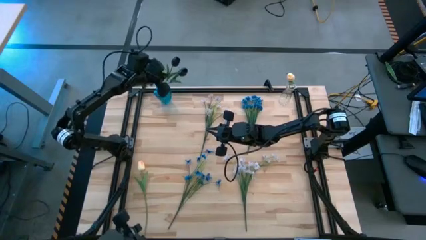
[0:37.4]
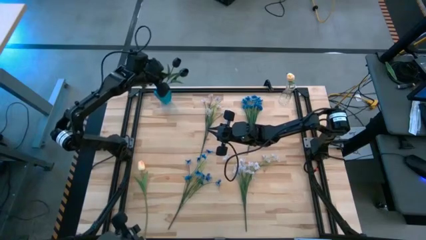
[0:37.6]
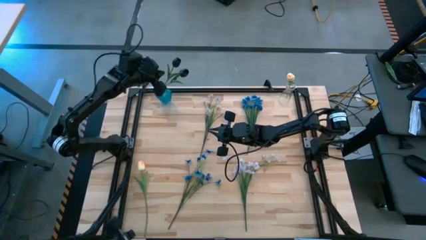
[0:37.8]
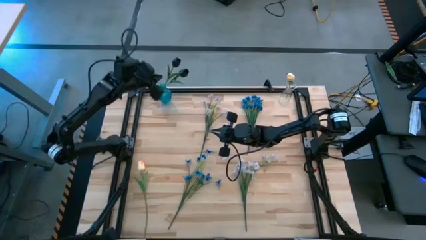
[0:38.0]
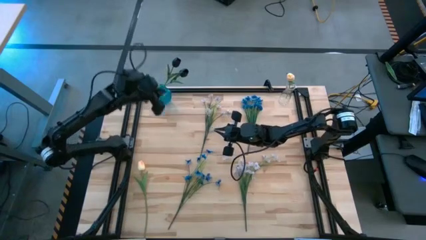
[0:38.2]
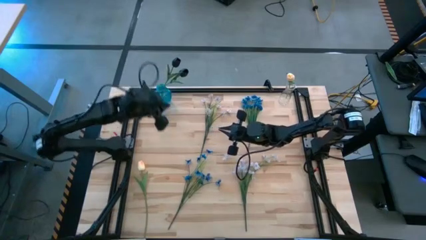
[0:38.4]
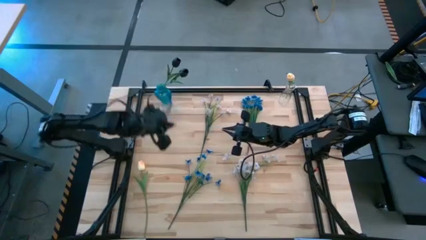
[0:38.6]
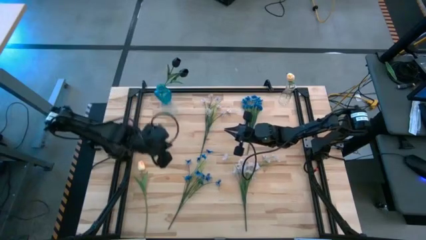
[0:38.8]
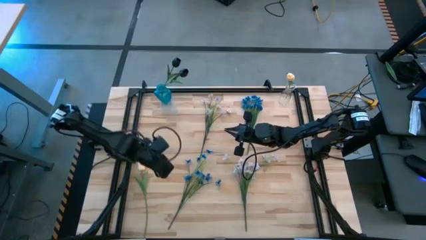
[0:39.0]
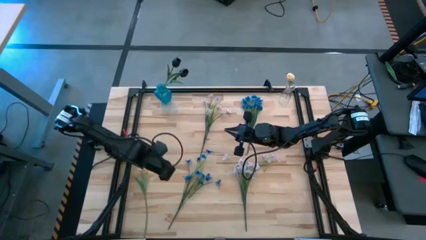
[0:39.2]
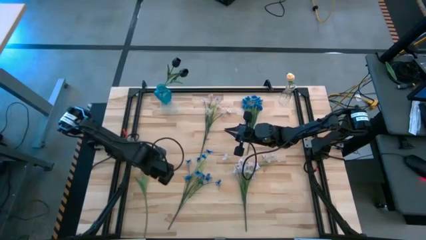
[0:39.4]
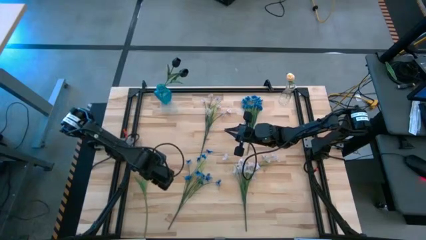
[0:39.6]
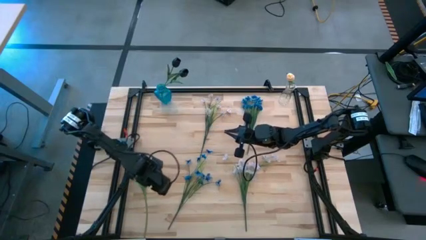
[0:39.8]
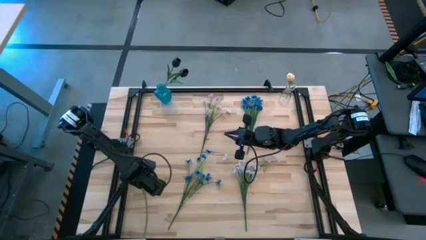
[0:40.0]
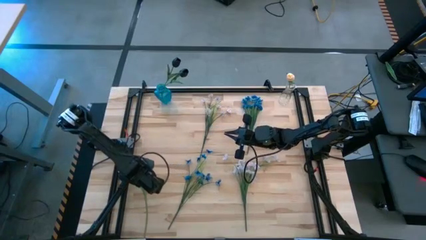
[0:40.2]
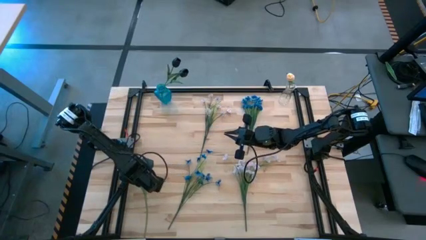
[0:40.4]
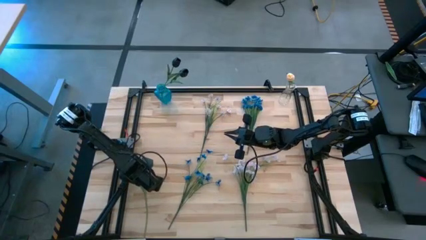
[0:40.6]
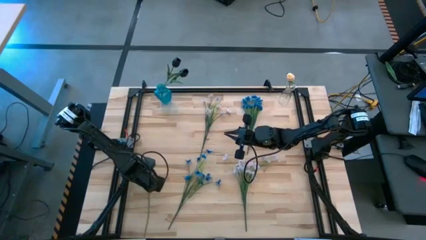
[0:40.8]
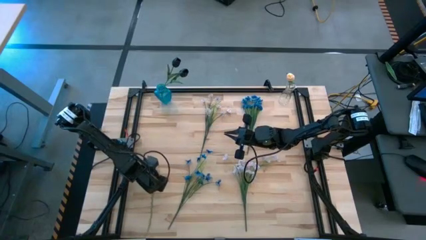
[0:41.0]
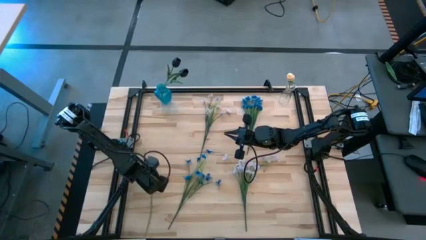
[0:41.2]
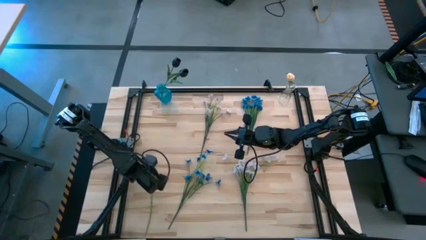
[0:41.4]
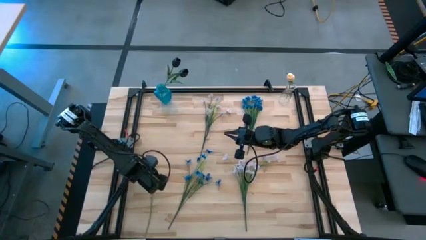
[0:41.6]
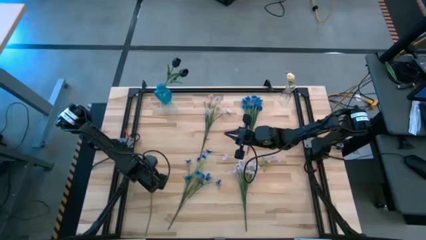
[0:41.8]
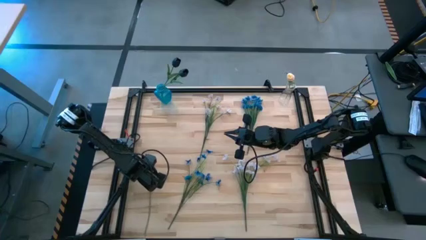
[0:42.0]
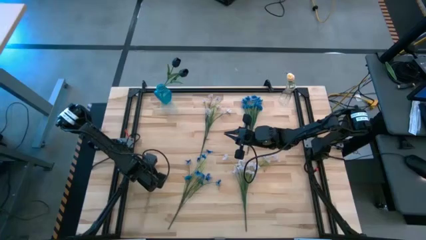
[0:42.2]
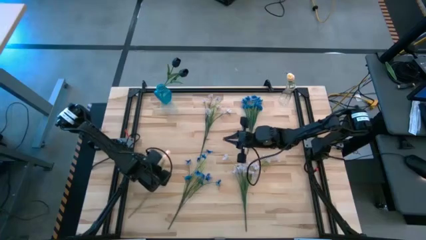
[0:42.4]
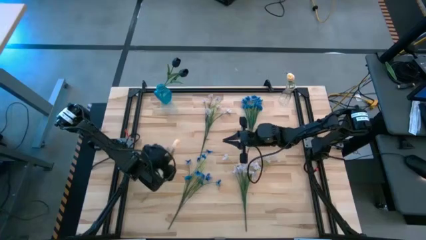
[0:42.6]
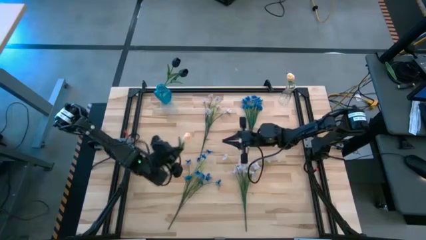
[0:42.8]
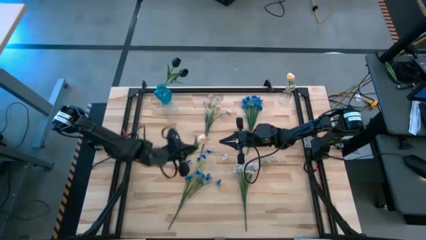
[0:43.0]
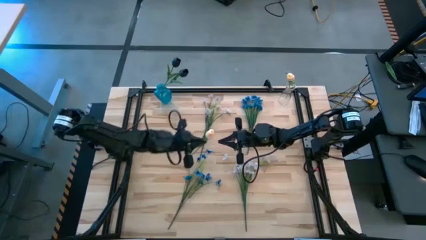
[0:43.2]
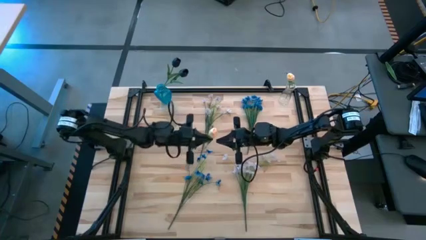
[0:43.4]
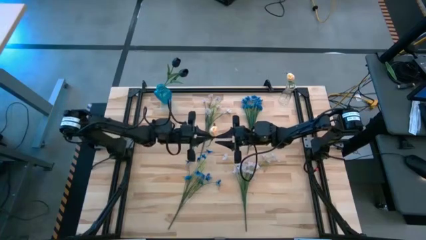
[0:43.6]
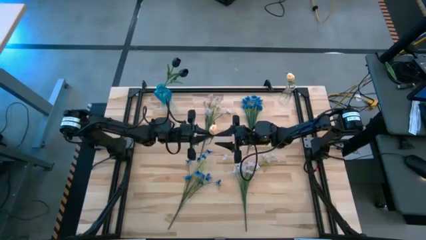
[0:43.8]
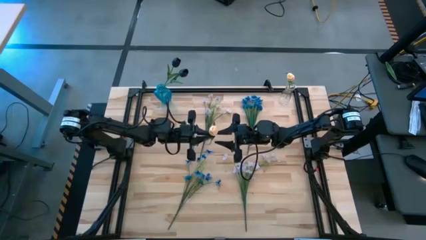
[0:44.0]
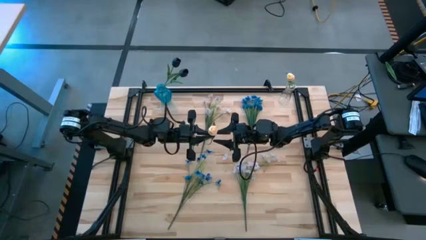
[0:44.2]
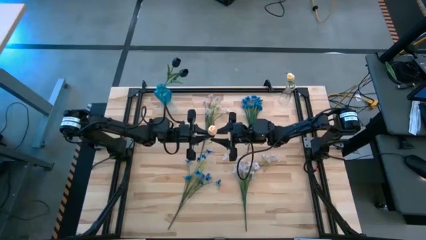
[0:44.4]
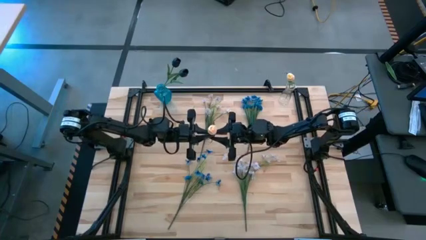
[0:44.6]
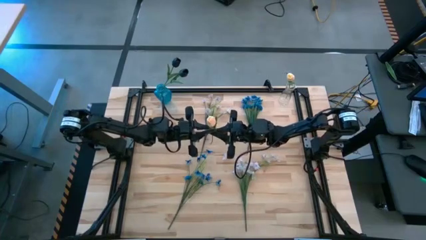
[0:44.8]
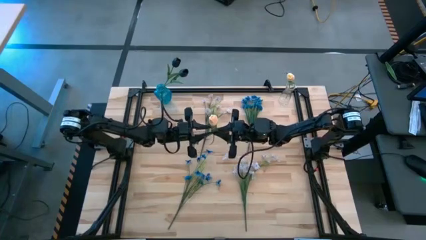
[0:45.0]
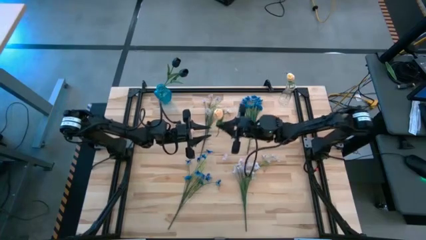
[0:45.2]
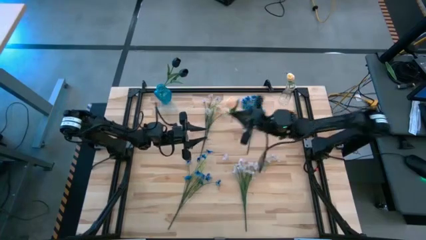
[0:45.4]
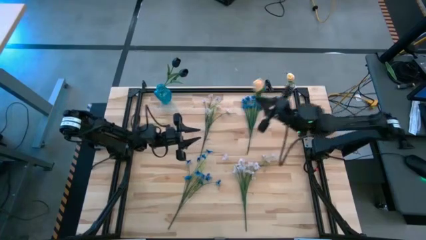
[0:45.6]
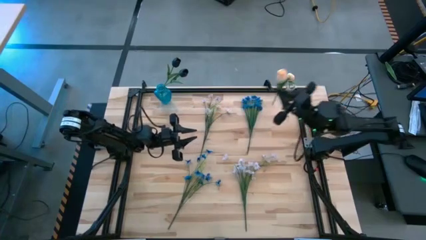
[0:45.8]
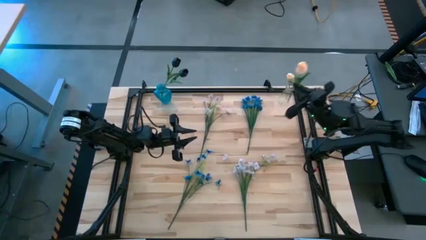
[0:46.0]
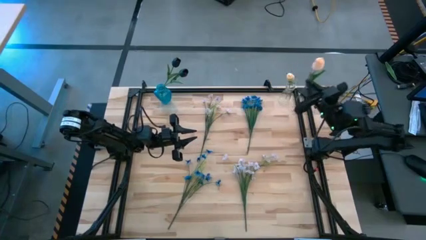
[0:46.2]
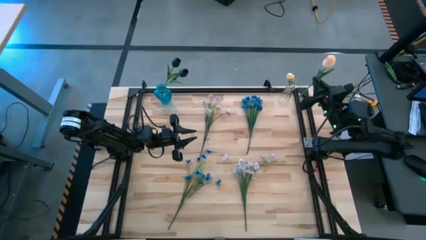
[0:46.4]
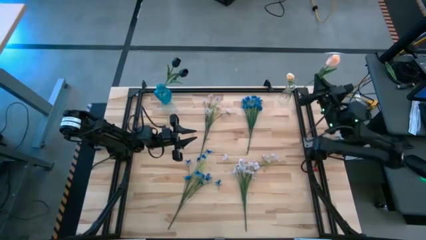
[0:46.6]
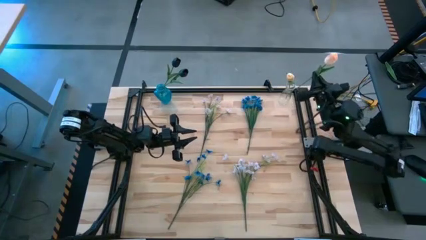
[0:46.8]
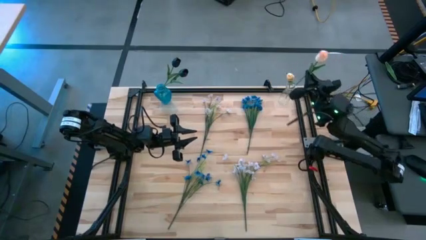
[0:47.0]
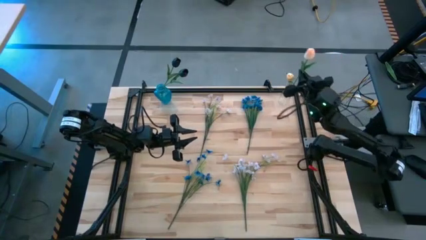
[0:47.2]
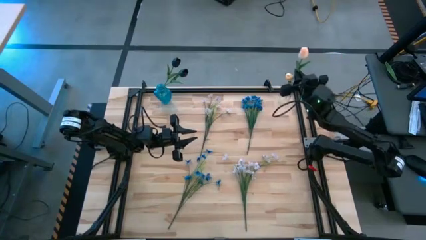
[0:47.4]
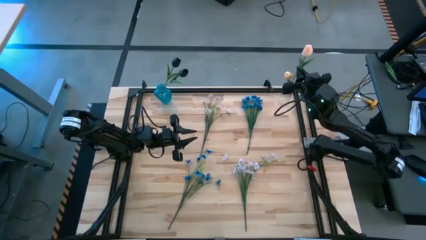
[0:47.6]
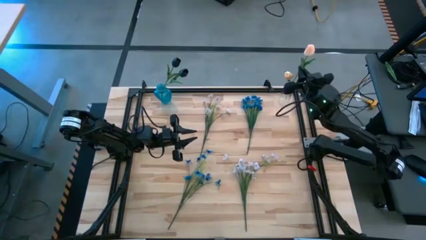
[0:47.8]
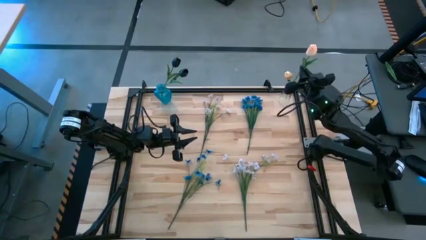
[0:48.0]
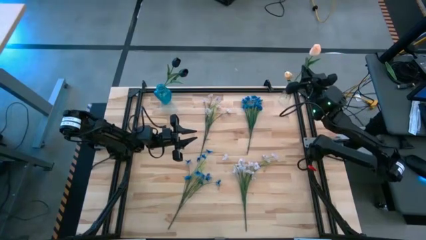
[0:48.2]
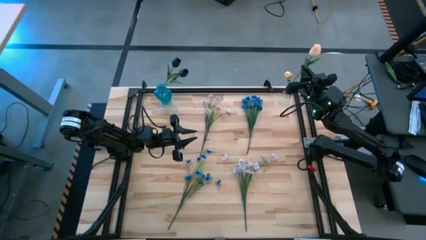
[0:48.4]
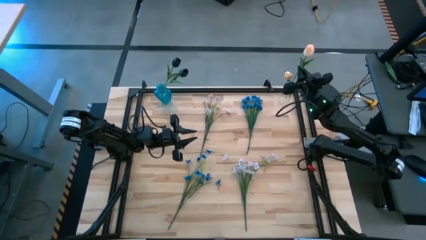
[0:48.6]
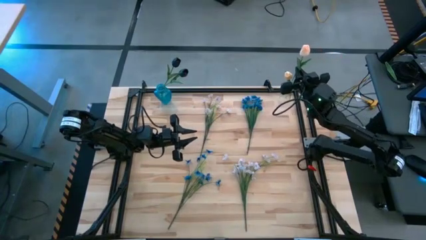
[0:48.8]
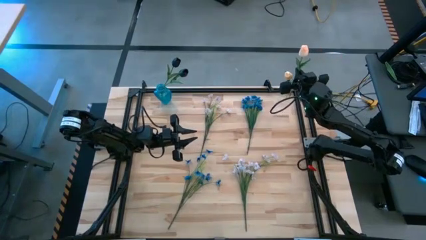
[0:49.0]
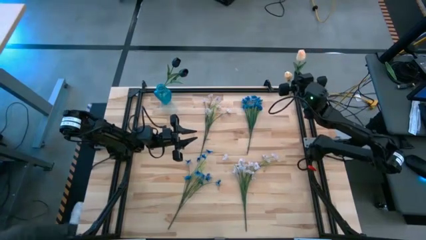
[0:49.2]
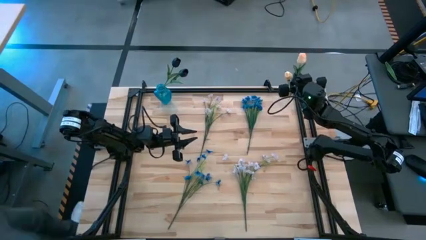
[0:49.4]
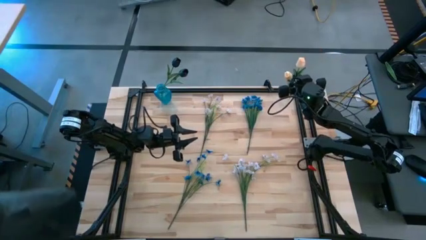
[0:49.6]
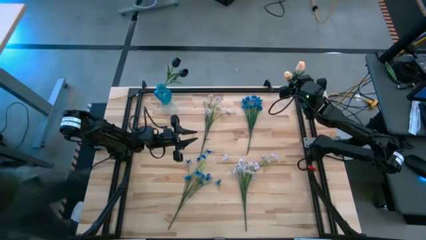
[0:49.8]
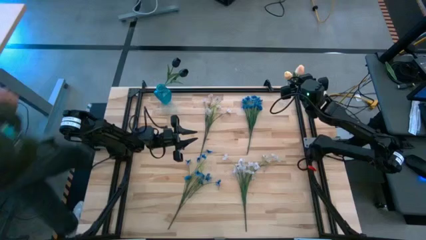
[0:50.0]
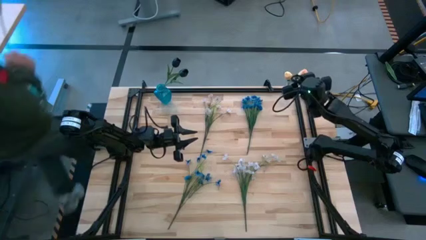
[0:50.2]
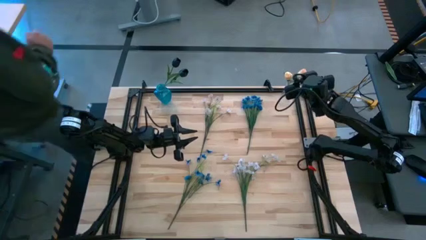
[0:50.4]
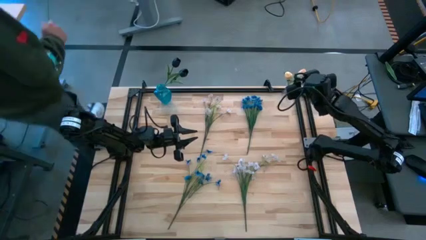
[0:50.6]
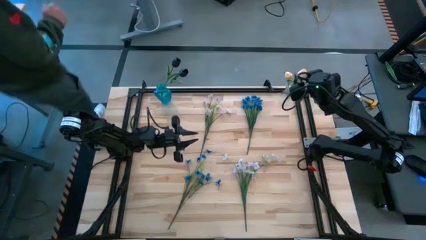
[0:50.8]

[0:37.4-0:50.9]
Task: Sort flowers into vase by color
Put the yellow flower into the transparent vase

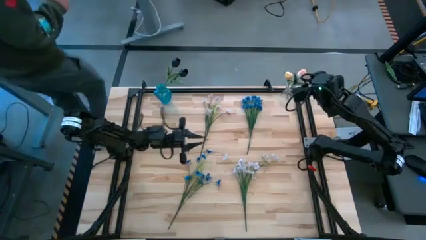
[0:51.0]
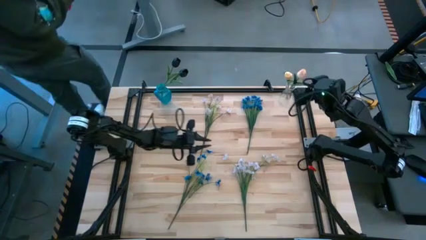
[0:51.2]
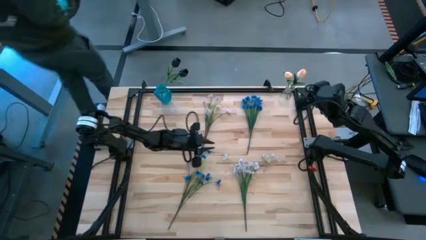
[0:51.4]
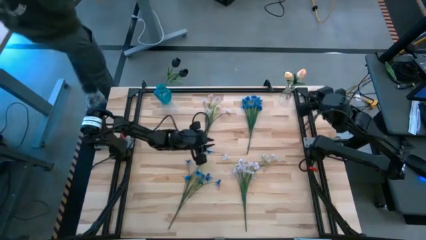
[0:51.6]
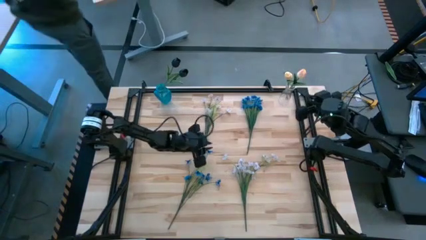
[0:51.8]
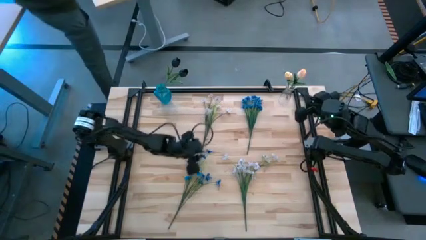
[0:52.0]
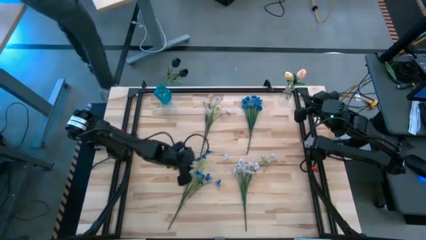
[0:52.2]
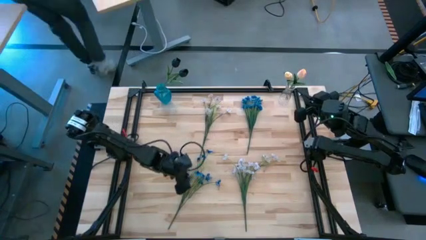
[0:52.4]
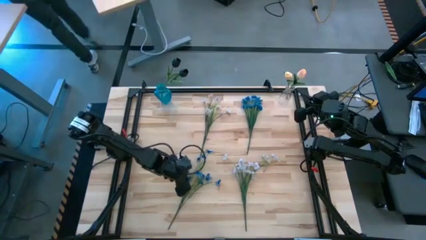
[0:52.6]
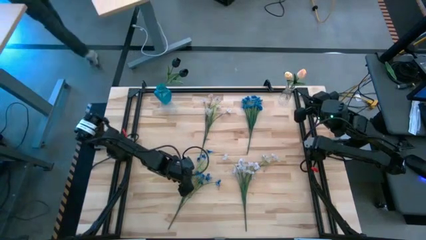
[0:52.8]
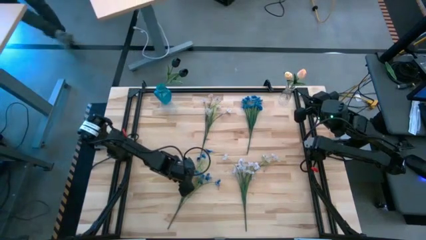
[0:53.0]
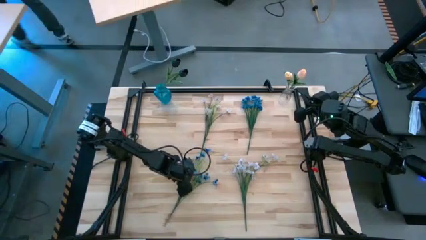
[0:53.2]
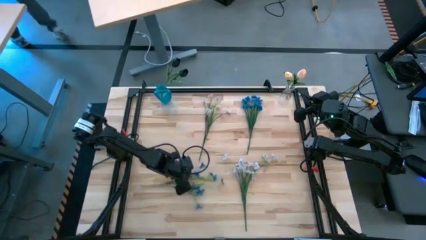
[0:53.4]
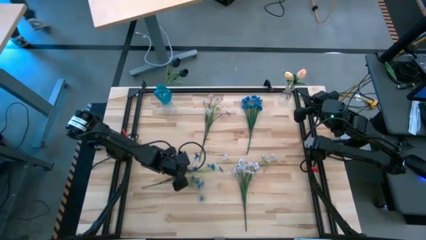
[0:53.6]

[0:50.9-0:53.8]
Put the bottom blue flowers into the blue vase
